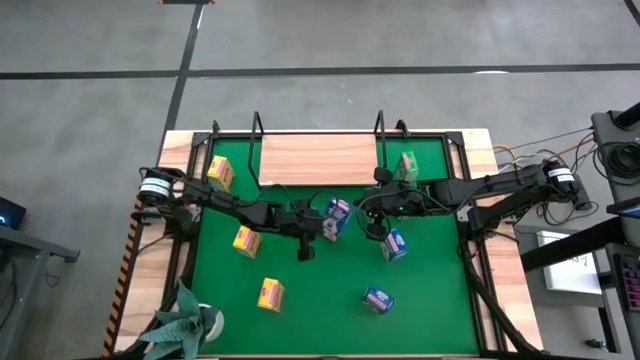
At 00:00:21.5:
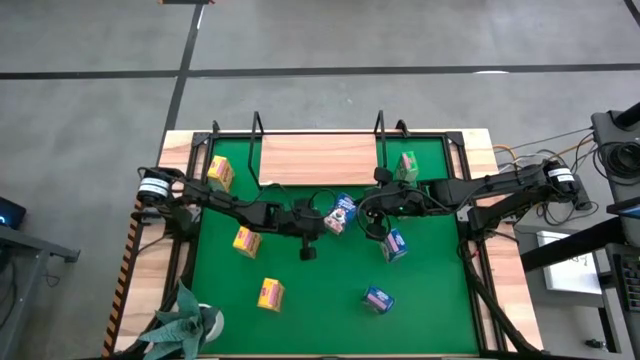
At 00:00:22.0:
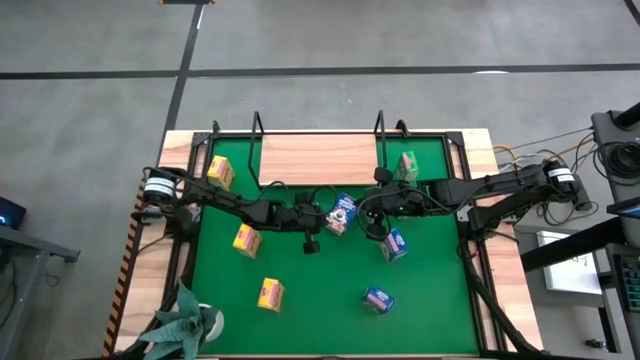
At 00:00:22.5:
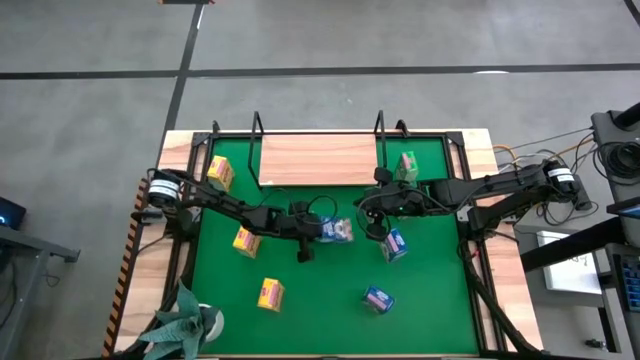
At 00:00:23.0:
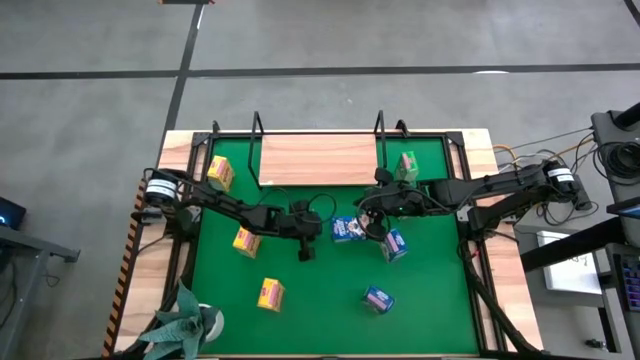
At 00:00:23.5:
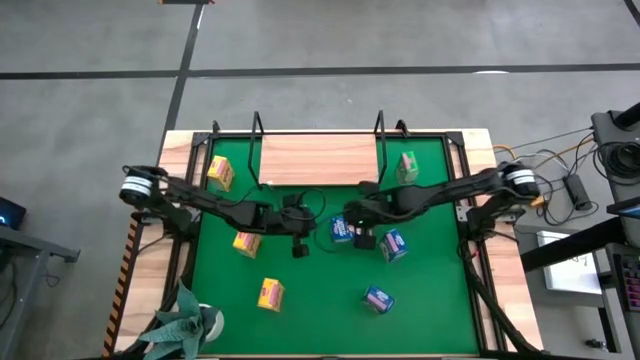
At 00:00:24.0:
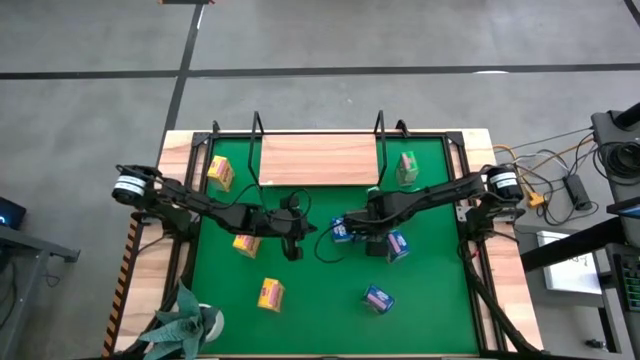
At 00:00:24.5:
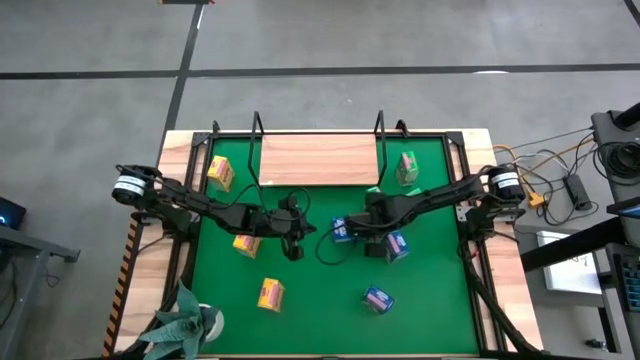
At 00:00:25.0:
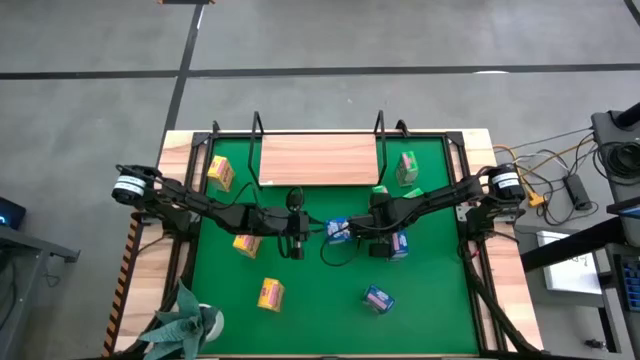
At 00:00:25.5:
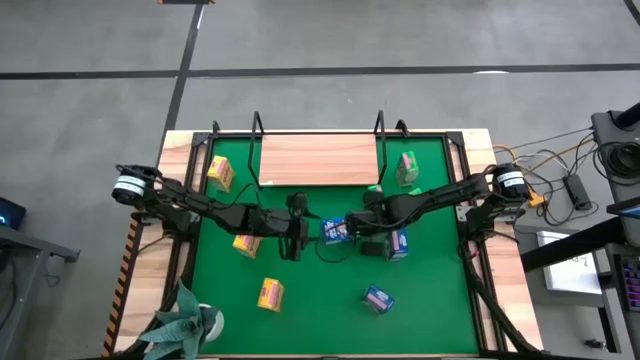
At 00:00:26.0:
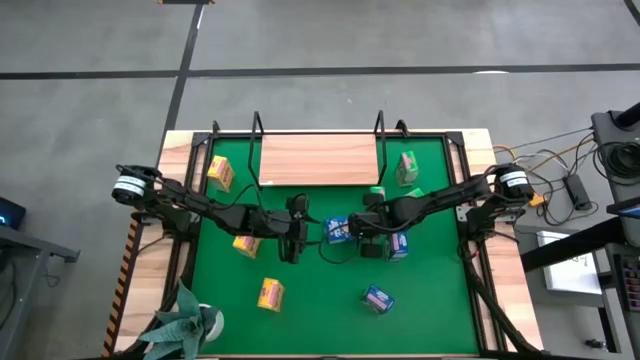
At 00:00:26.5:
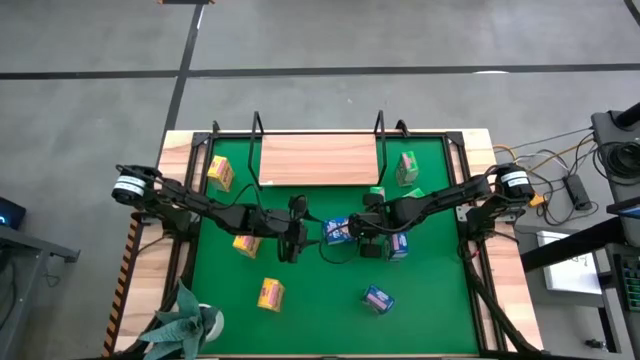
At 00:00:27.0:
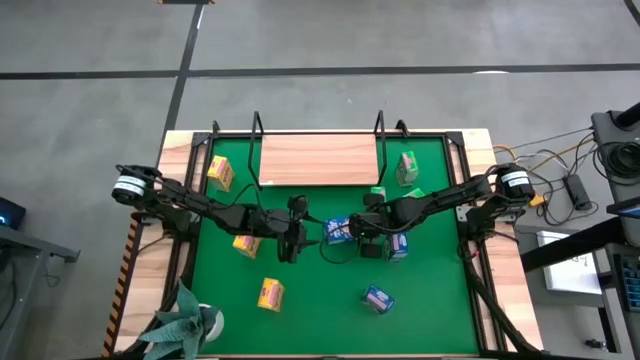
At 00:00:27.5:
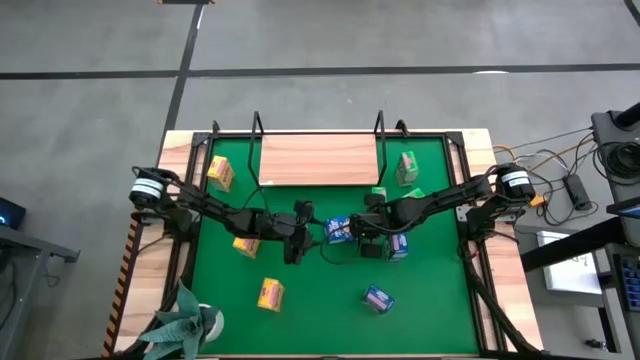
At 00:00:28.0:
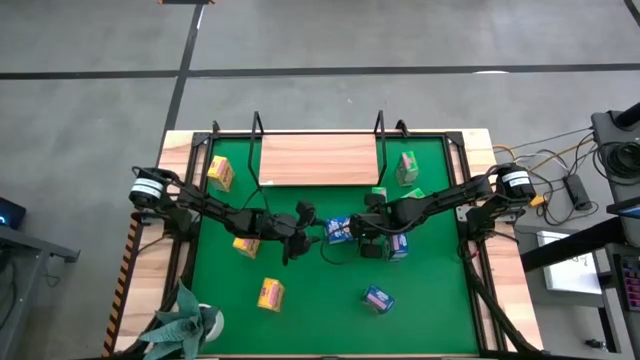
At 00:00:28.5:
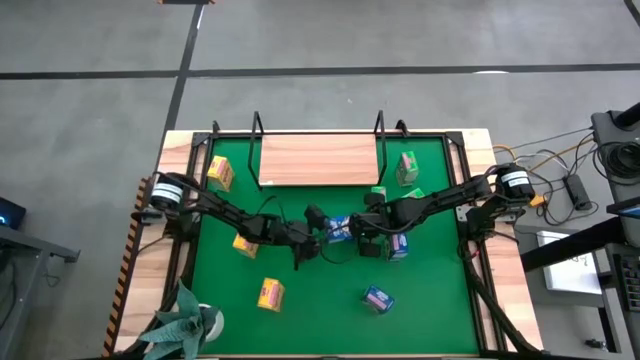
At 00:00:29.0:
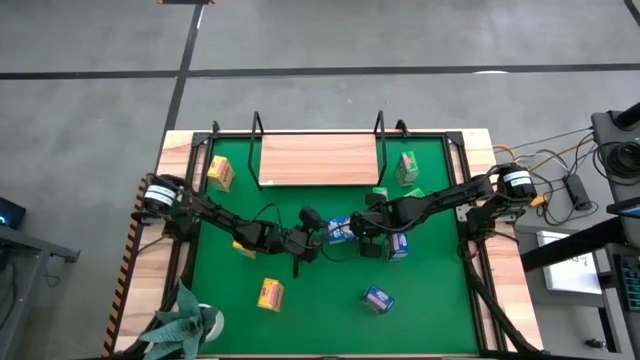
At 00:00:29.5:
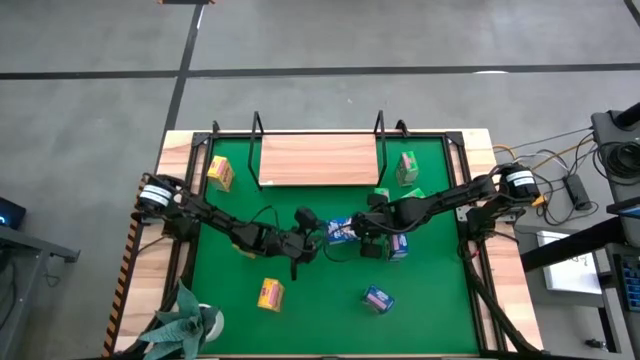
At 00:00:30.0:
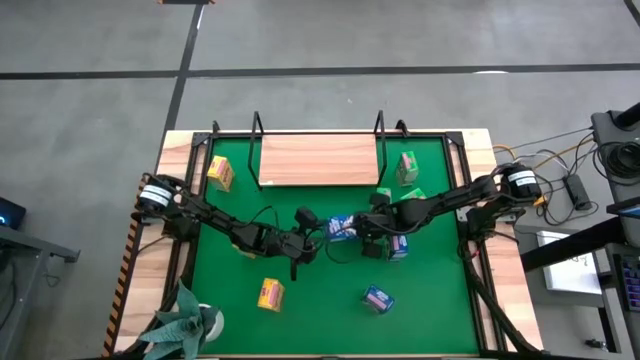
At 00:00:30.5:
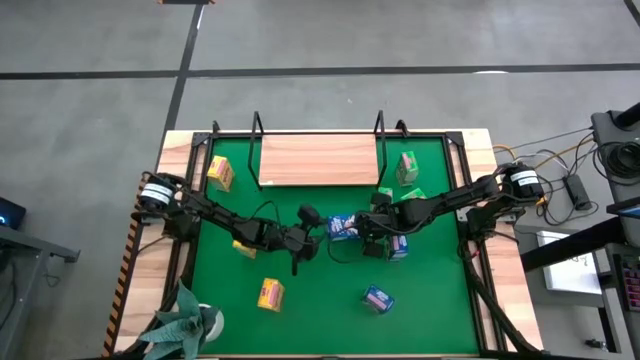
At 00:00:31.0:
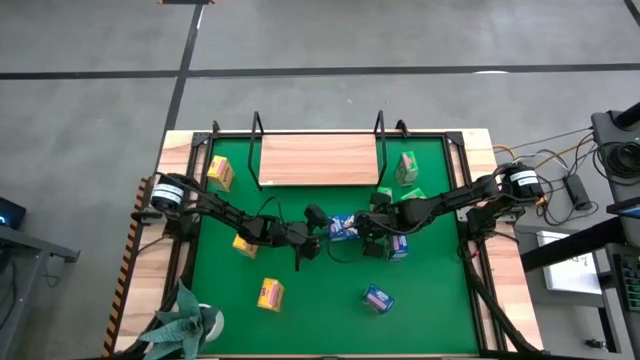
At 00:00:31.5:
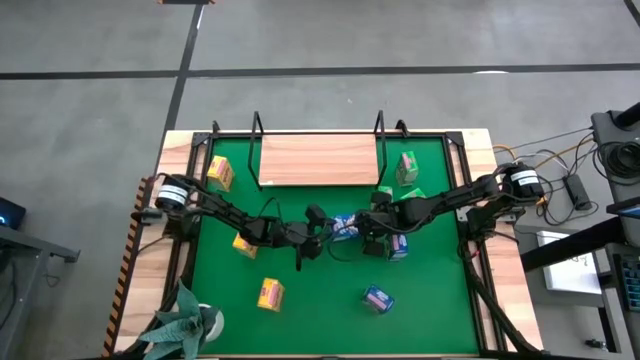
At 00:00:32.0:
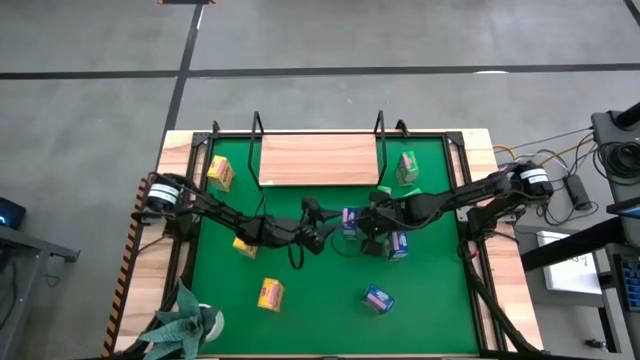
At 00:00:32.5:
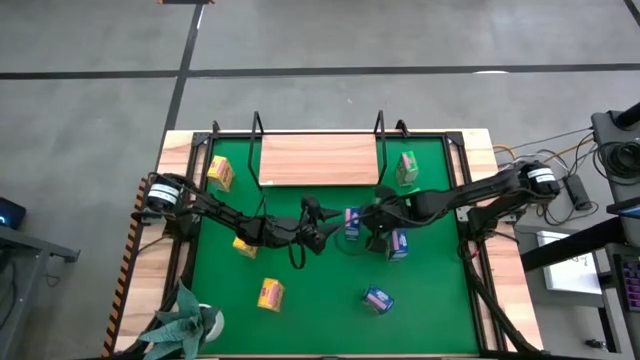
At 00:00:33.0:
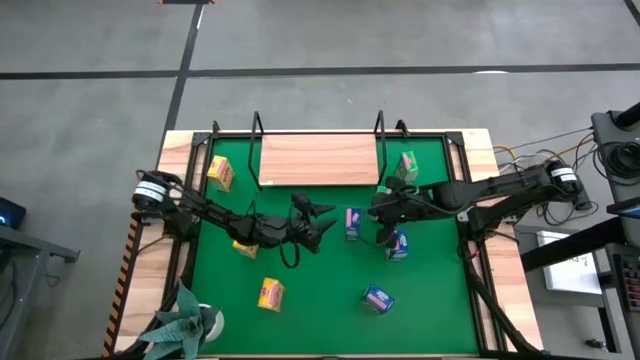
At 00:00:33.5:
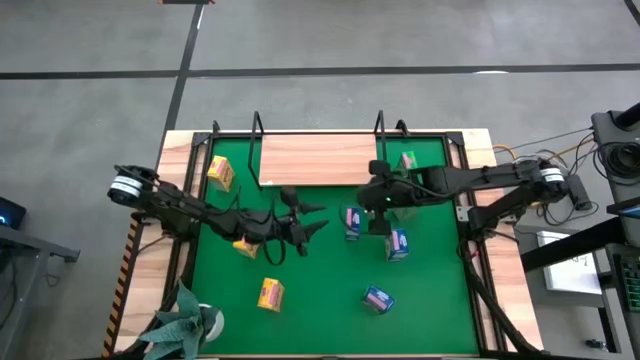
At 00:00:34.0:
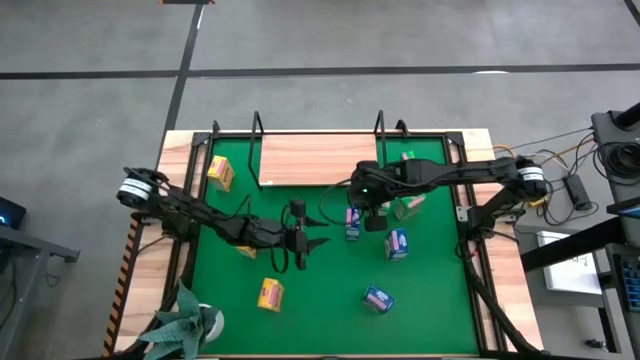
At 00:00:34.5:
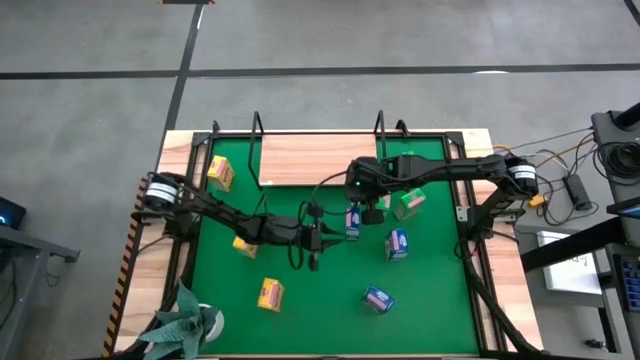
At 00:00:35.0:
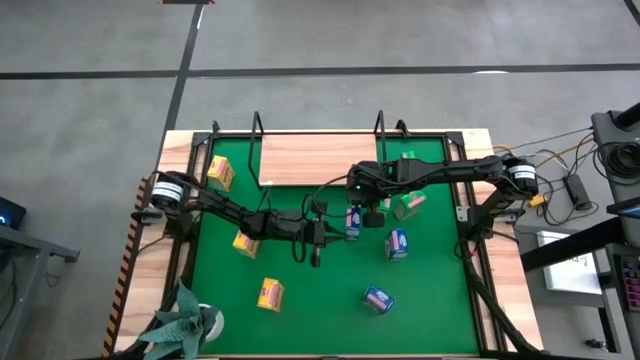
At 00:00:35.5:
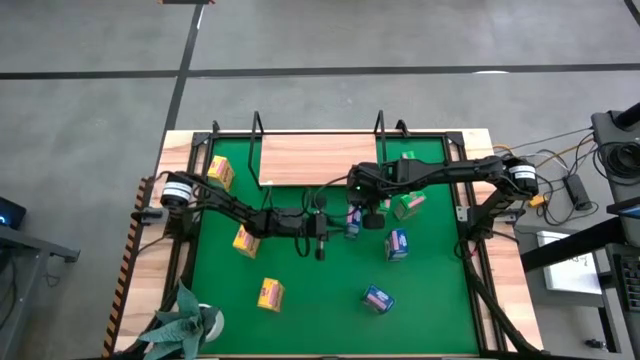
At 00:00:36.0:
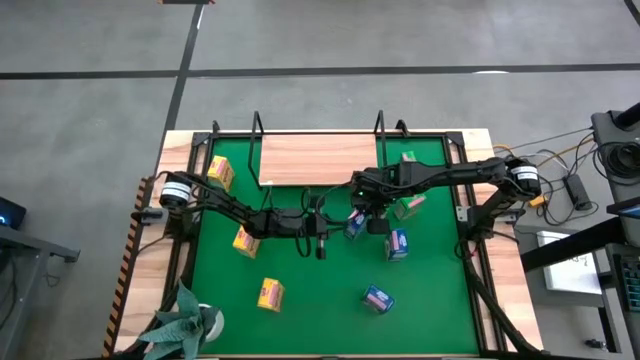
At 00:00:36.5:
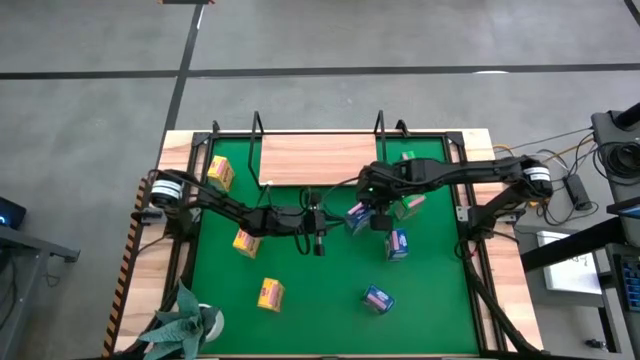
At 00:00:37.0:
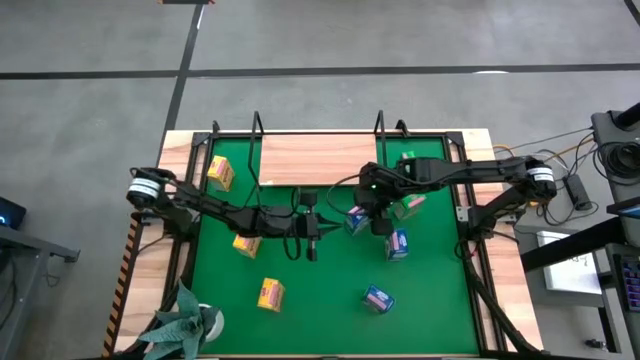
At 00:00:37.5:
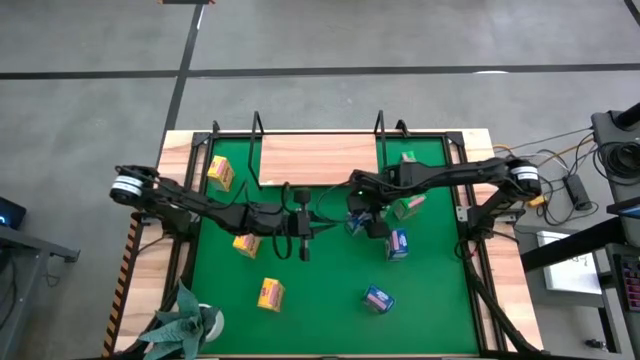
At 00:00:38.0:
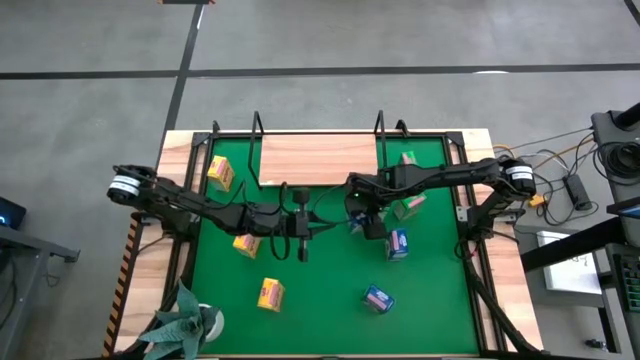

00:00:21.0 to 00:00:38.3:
Task: Stack cereal on shelf
Put the middle blue cereal box on the shelf
